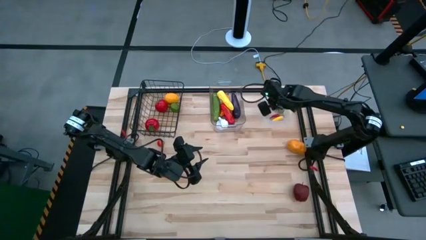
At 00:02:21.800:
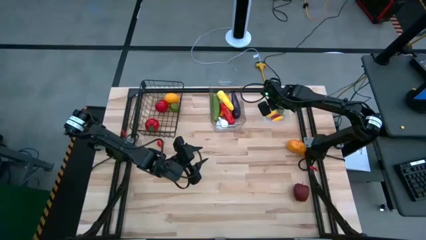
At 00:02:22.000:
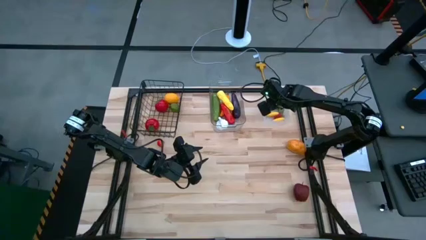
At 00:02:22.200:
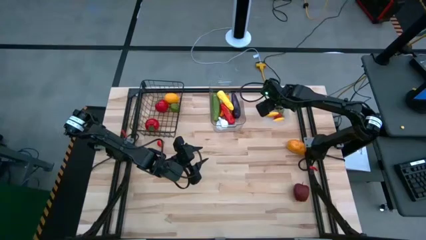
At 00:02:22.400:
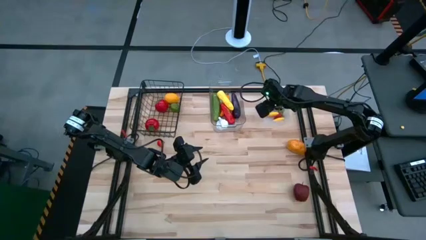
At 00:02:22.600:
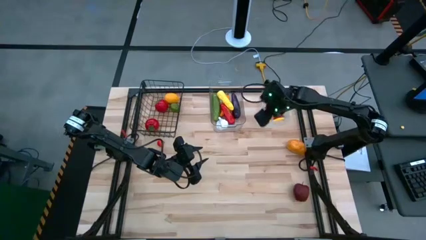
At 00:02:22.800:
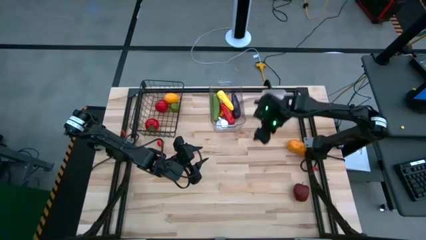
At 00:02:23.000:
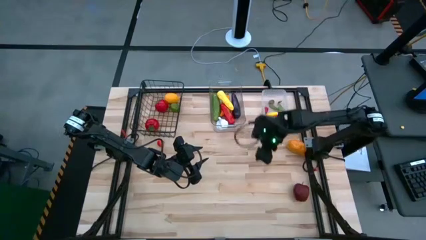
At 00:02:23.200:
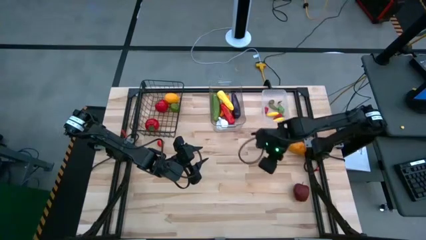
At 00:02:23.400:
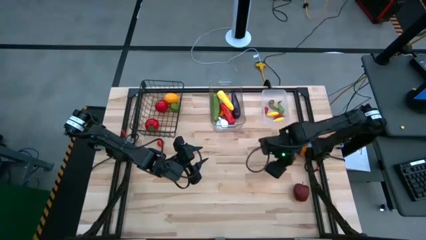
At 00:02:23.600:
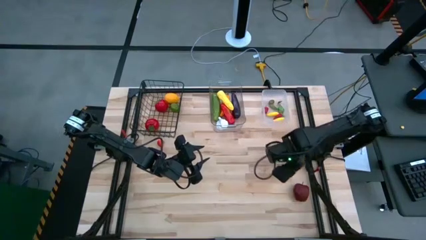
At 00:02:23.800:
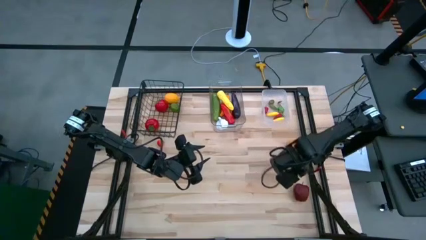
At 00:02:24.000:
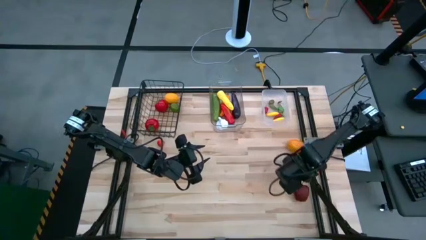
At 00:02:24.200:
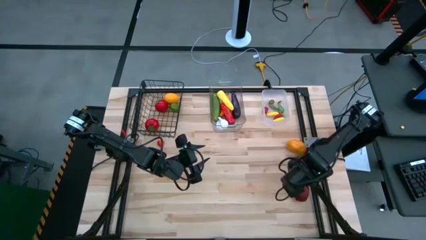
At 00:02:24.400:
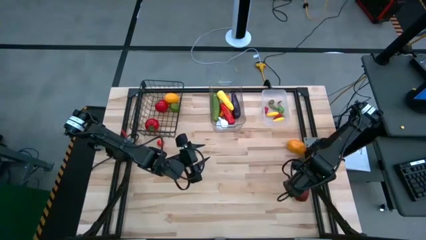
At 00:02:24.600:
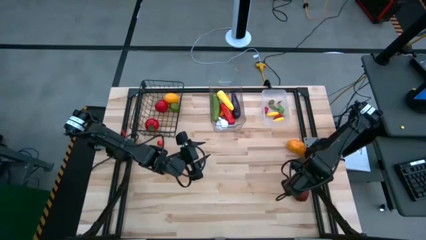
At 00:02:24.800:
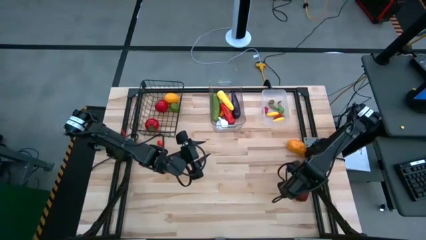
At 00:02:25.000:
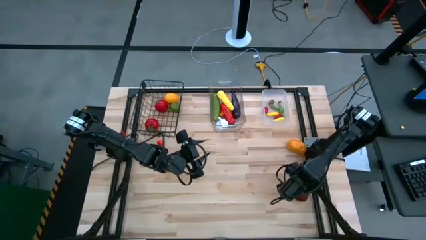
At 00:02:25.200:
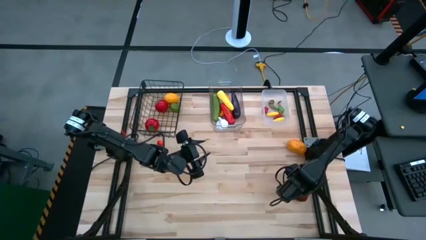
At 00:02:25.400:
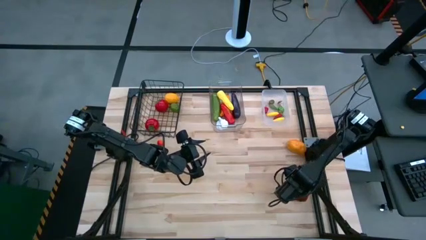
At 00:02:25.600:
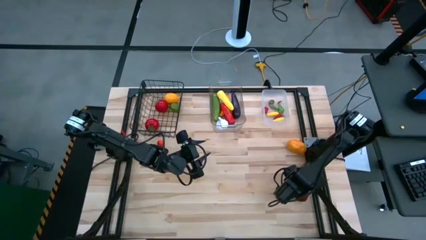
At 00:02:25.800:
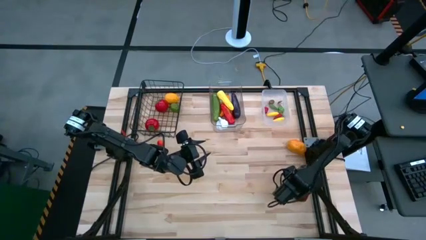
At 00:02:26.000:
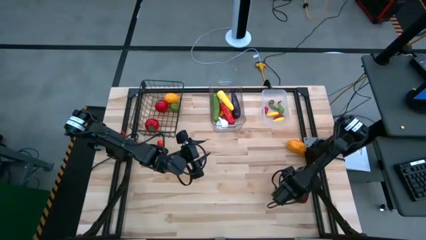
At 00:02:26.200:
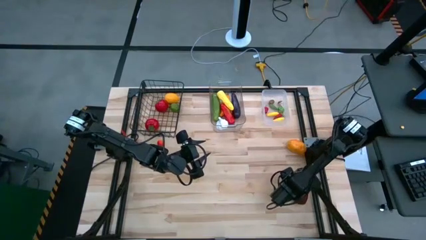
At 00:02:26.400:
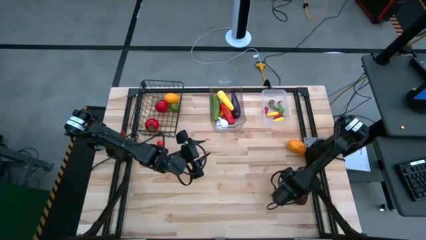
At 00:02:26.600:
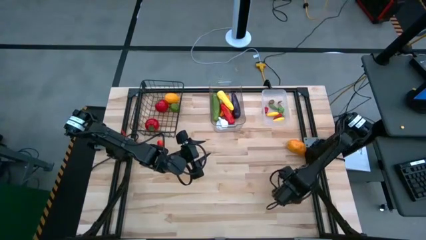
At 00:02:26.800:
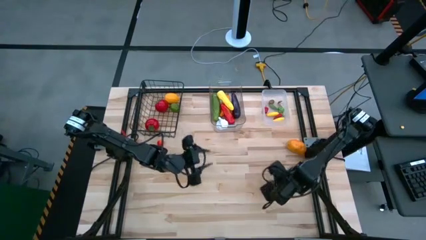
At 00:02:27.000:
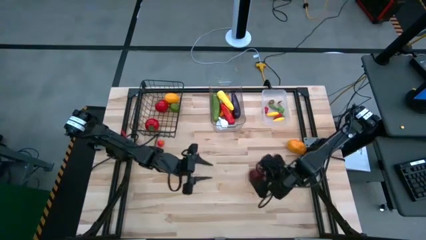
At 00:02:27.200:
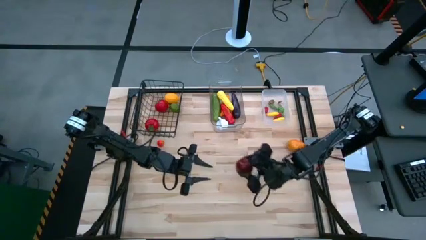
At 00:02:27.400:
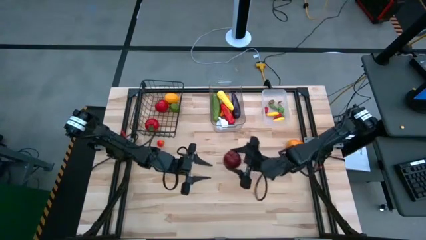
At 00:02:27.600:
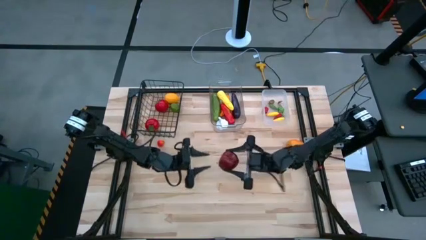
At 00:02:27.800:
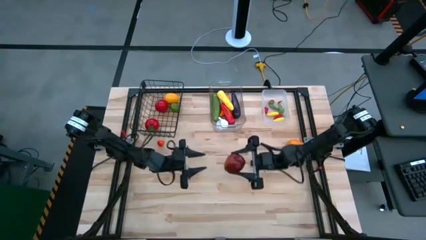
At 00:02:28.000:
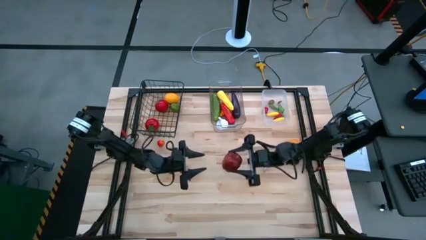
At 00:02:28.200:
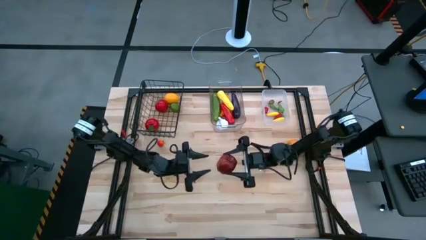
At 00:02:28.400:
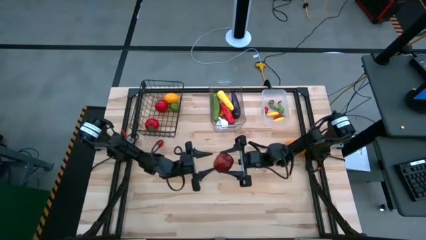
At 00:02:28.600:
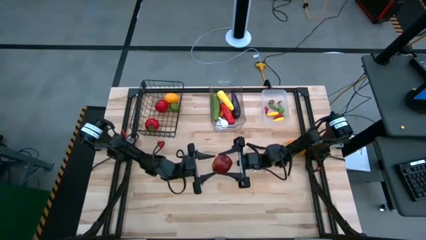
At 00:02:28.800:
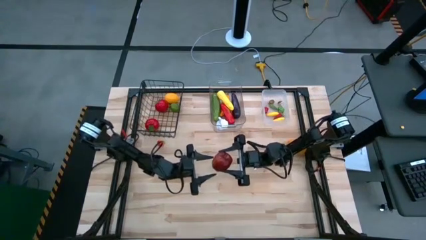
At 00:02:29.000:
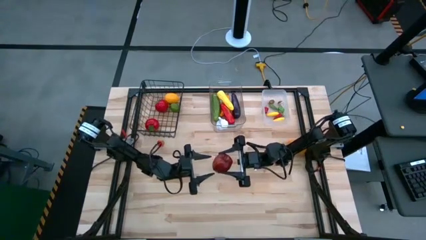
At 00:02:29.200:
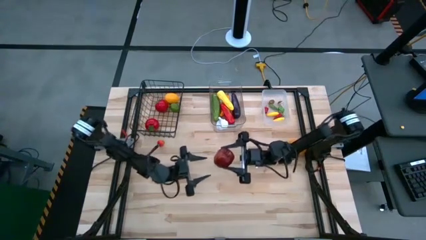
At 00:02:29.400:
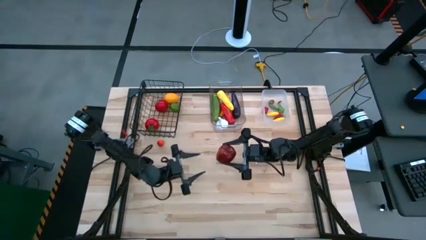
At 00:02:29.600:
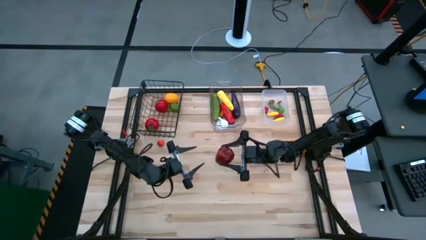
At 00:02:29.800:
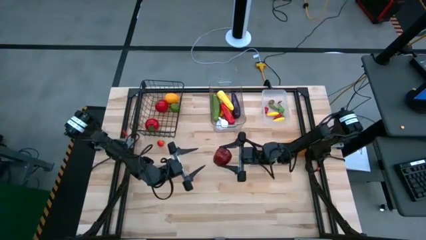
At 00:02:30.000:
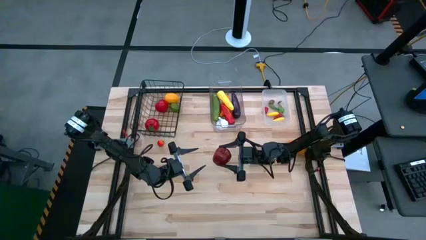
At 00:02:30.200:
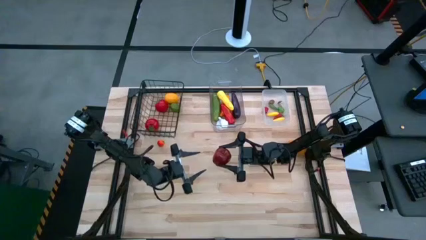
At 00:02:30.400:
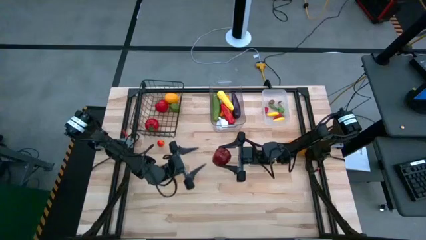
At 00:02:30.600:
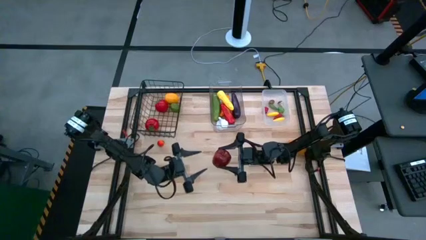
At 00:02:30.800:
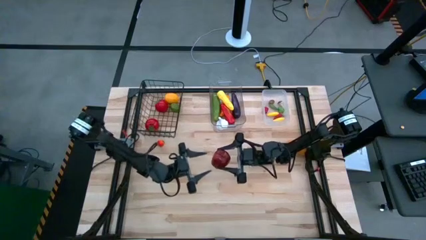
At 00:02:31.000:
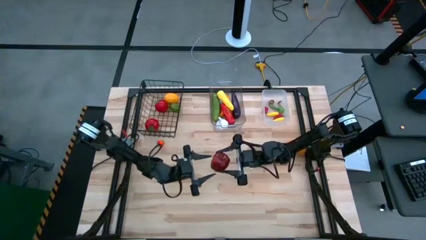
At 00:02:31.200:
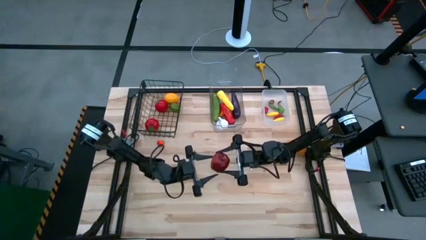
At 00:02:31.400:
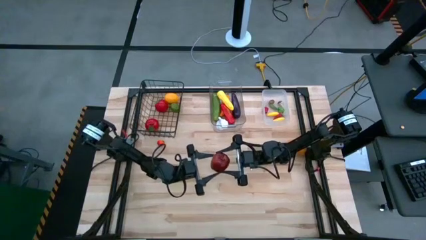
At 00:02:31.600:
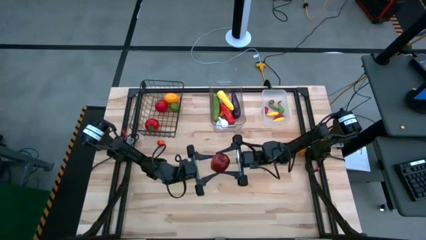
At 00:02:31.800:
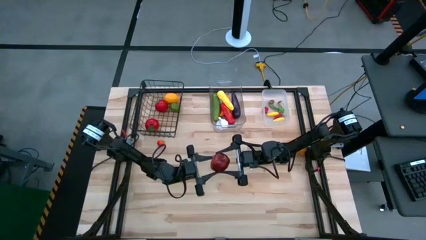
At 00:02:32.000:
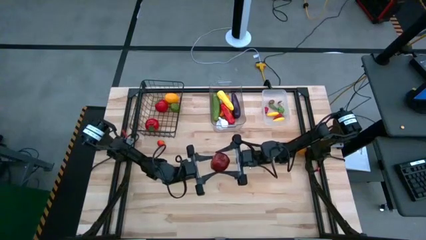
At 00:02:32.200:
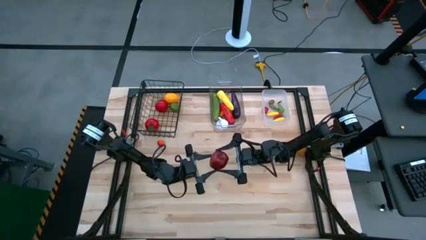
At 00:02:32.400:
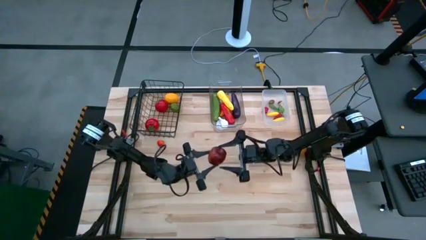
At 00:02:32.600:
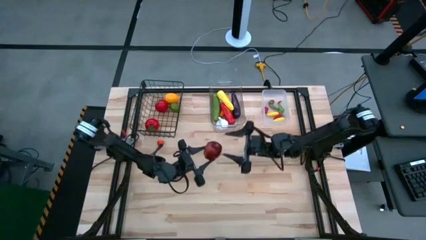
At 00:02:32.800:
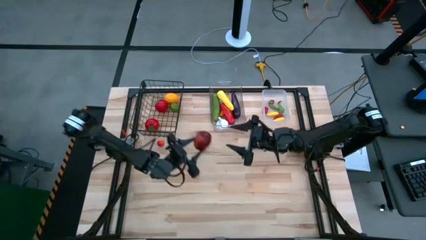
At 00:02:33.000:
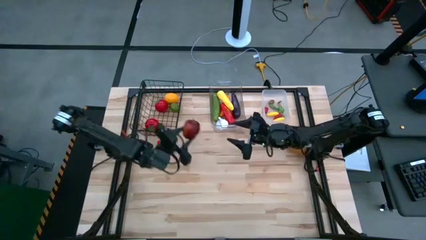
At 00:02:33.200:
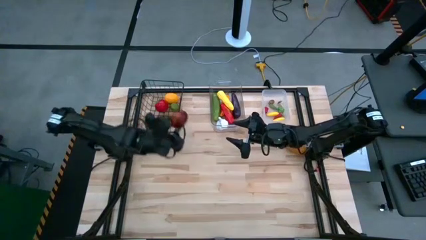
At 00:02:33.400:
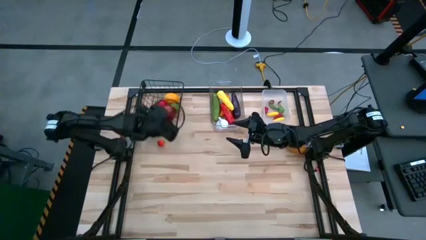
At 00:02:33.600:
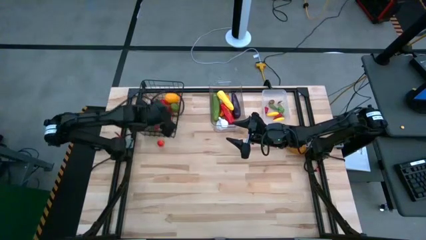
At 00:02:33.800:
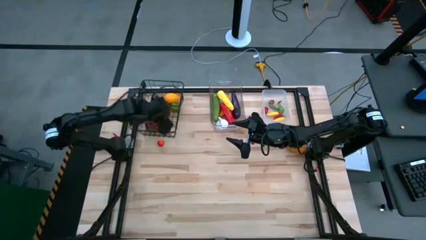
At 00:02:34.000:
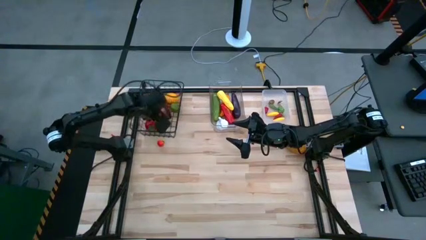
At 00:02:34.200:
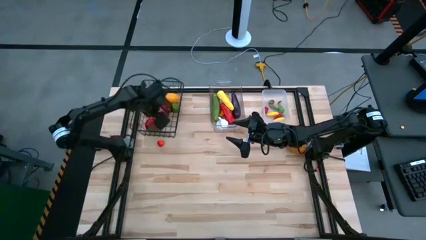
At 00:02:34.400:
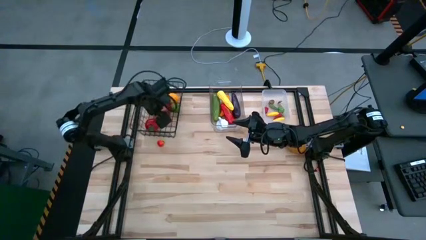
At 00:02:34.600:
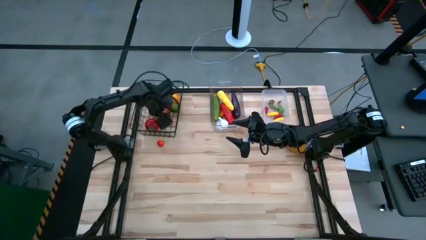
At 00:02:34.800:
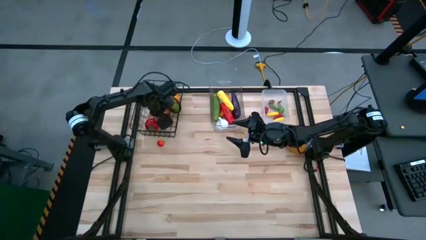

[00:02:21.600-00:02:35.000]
Task: Sort produce into baskets
Put the red apple into the black wire basket

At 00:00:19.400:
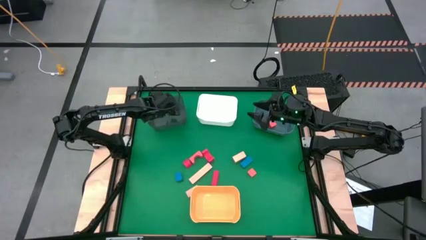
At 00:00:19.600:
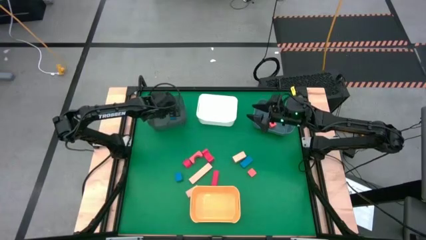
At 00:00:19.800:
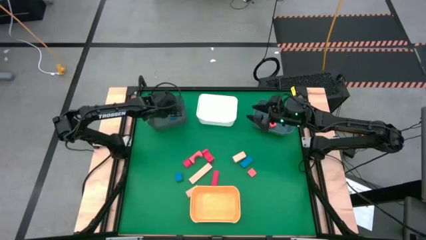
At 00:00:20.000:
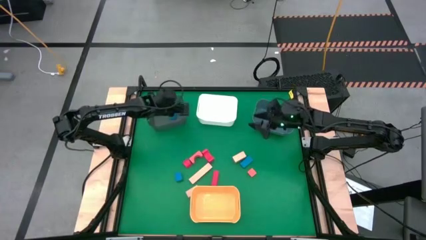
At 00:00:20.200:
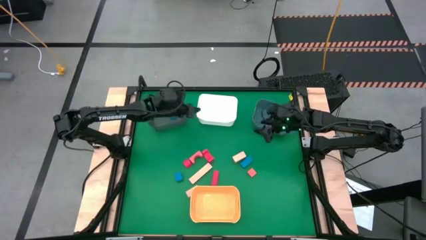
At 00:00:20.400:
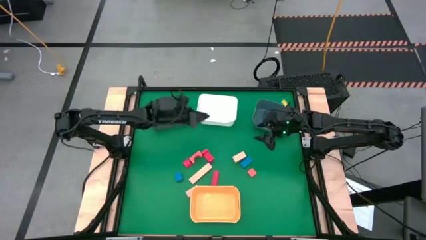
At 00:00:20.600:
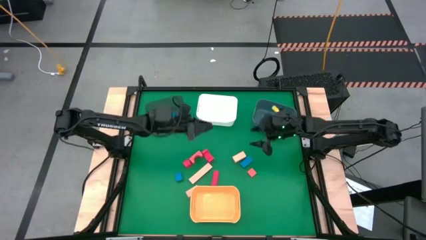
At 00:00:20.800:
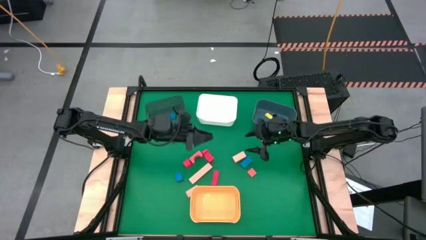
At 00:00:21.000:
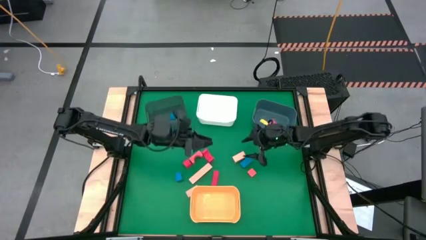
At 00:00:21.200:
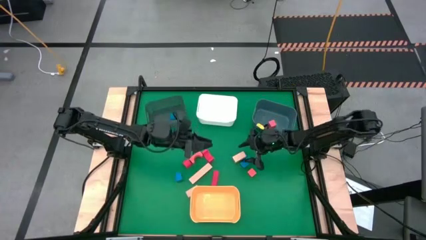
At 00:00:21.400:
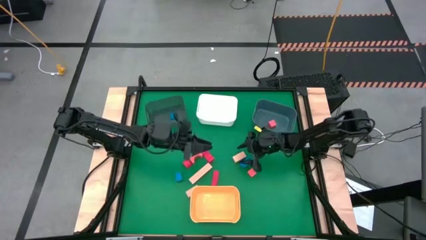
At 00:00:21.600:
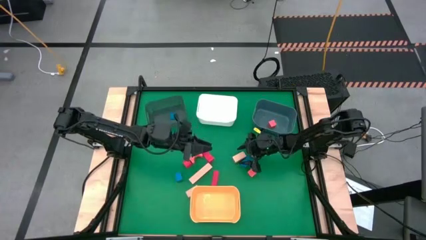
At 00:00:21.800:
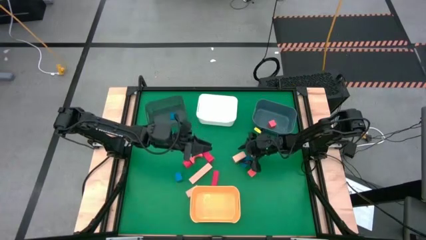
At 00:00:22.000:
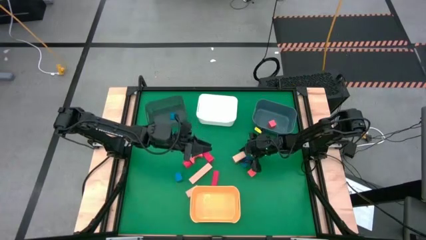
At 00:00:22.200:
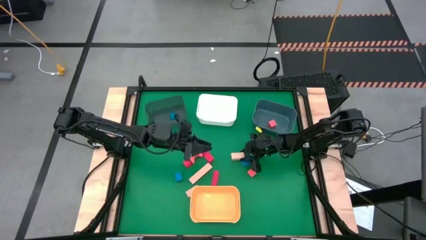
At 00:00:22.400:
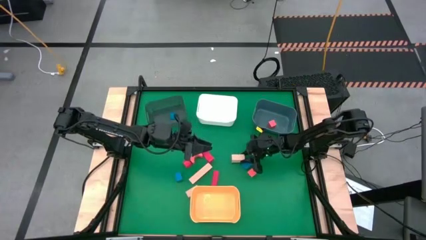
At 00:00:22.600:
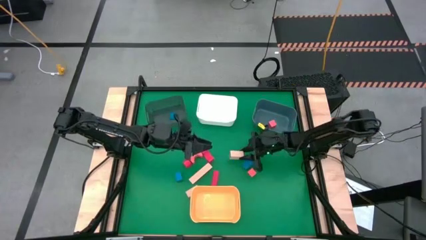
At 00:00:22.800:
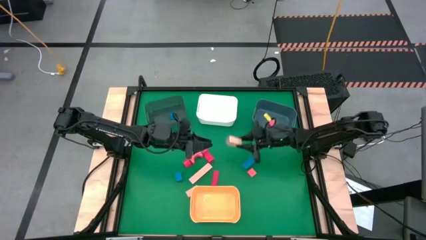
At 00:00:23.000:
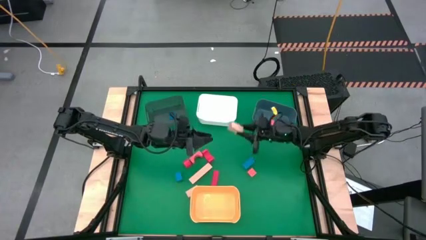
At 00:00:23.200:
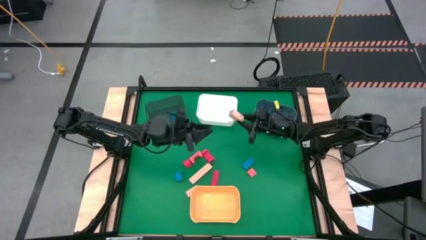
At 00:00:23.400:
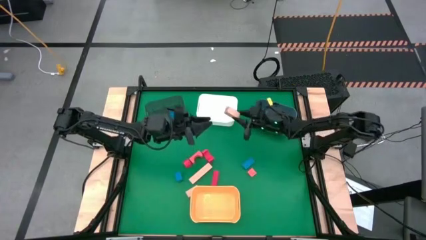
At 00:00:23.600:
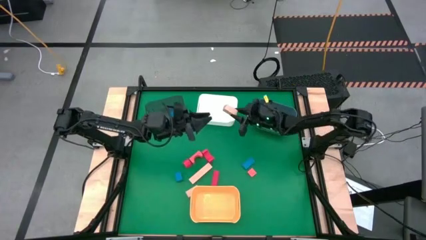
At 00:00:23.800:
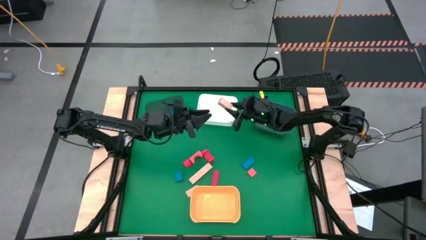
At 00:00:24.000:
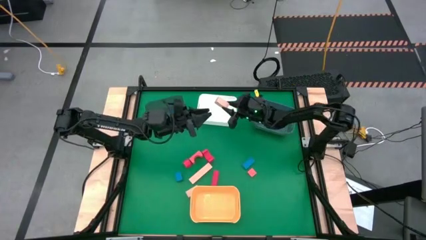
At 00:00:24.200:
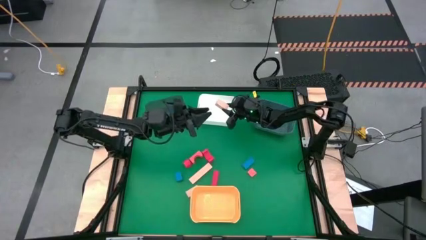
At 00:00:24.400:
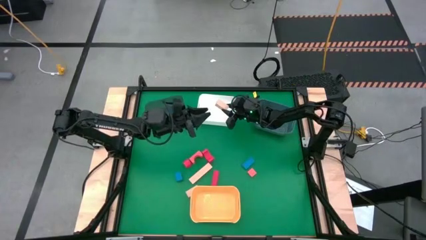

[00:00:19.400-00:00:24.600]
Task: Sort & place blocks by color
Put the wooden block into the white bin
